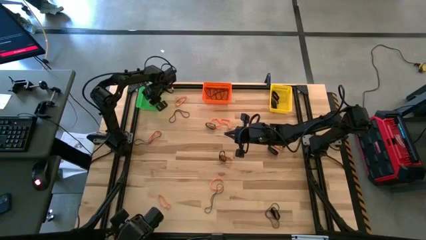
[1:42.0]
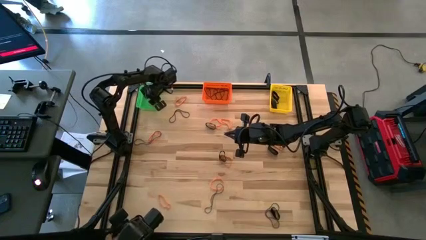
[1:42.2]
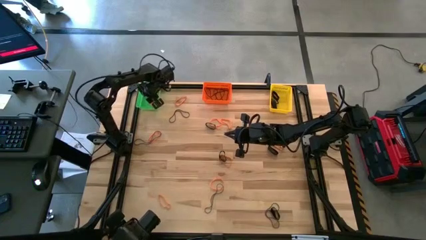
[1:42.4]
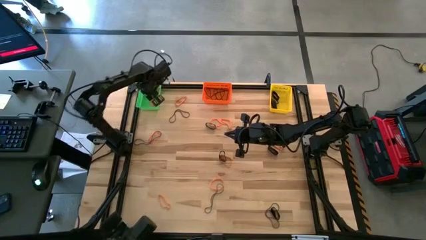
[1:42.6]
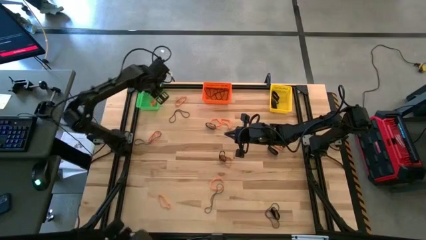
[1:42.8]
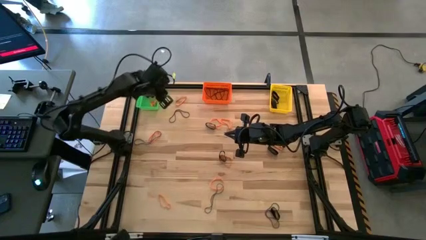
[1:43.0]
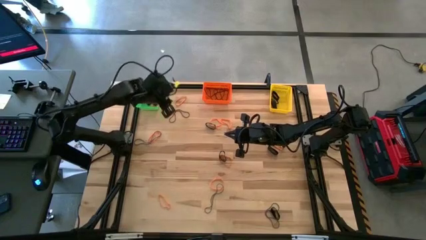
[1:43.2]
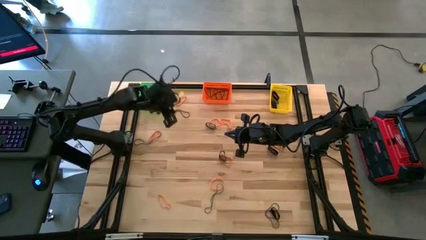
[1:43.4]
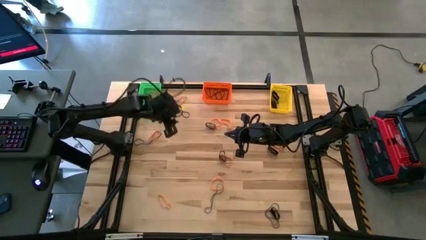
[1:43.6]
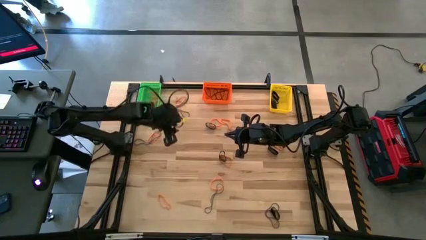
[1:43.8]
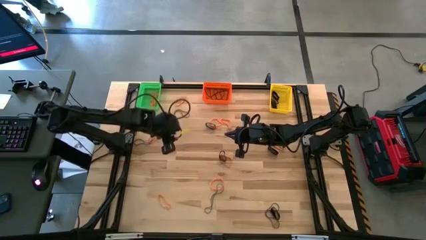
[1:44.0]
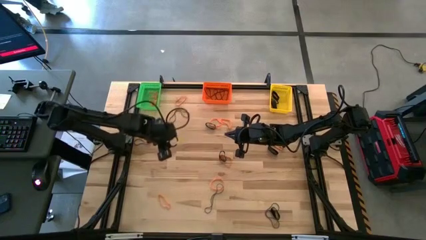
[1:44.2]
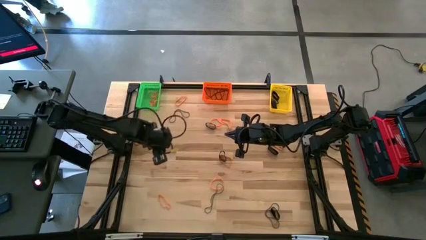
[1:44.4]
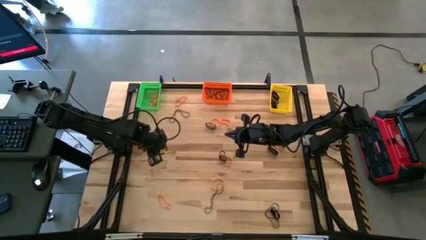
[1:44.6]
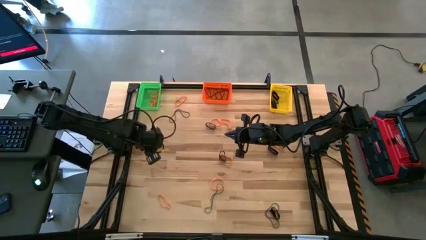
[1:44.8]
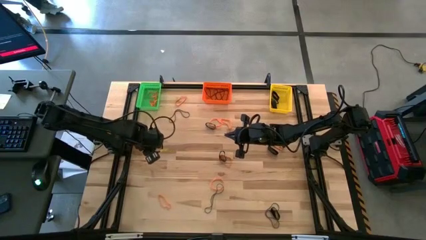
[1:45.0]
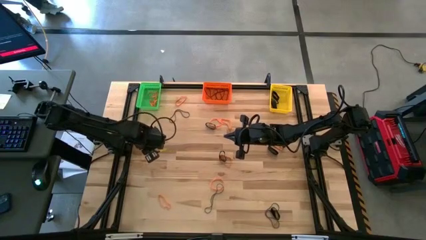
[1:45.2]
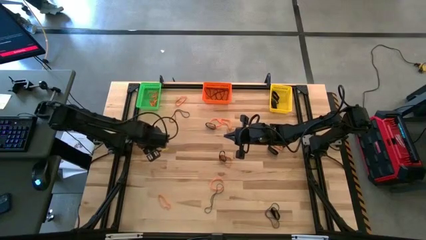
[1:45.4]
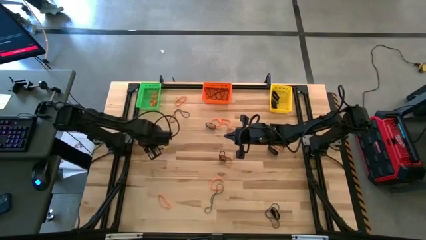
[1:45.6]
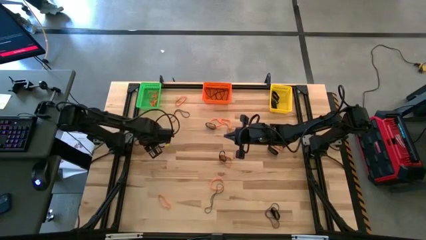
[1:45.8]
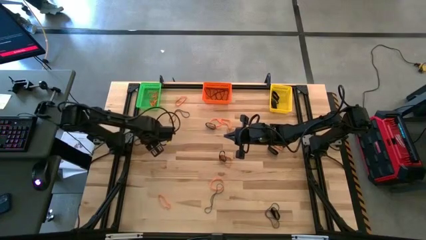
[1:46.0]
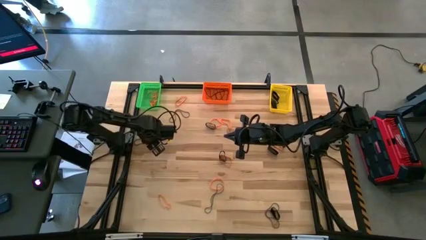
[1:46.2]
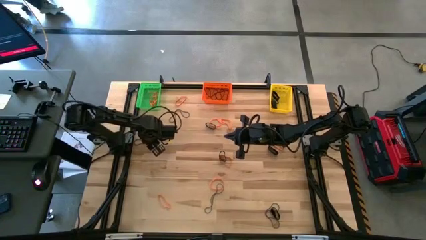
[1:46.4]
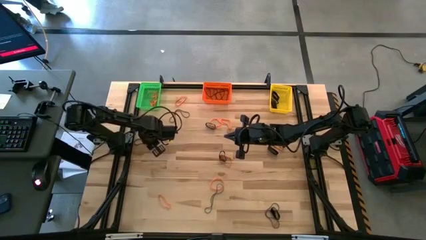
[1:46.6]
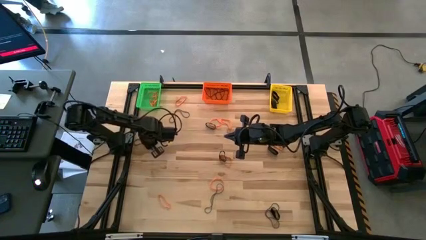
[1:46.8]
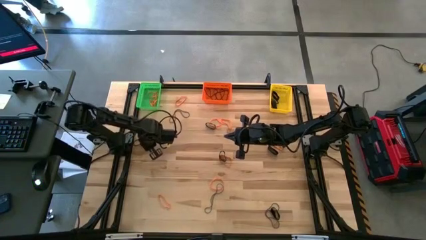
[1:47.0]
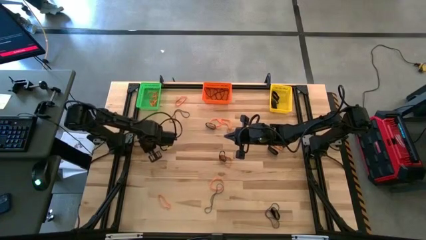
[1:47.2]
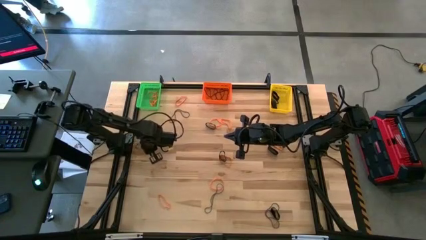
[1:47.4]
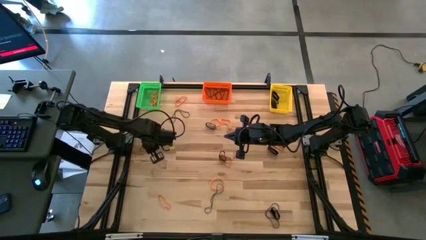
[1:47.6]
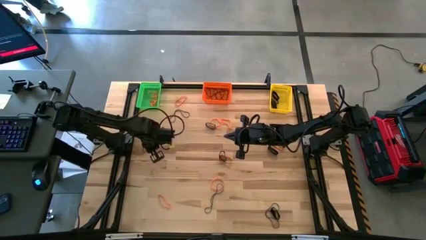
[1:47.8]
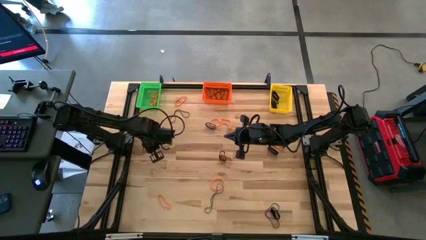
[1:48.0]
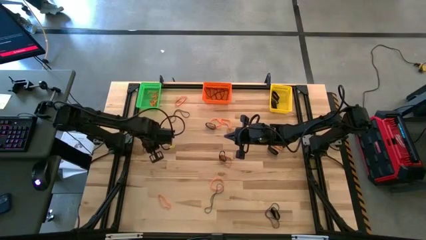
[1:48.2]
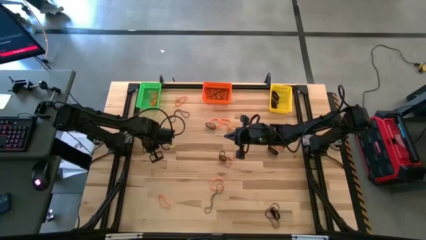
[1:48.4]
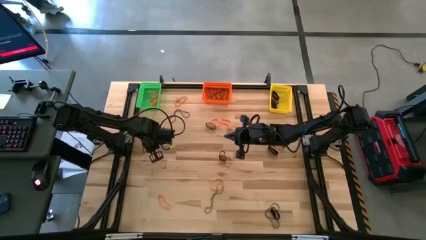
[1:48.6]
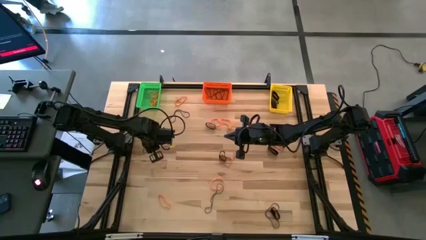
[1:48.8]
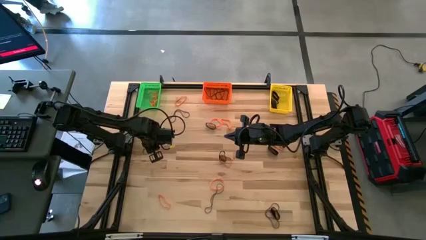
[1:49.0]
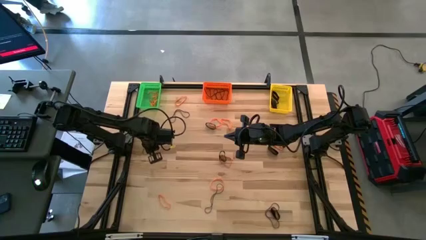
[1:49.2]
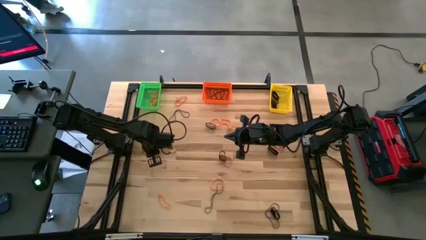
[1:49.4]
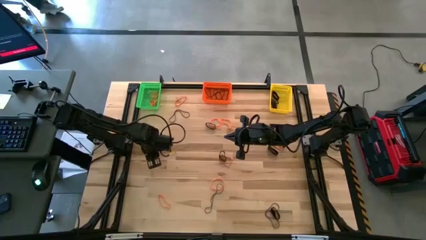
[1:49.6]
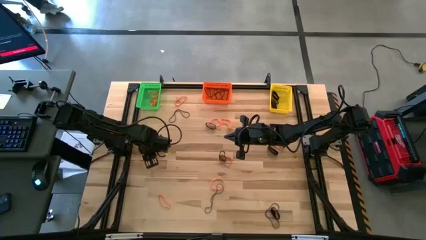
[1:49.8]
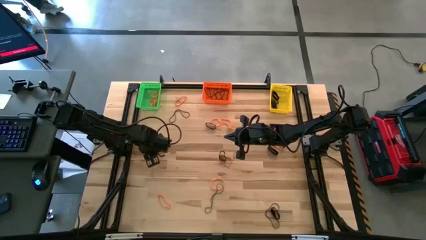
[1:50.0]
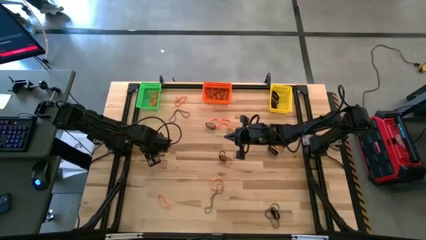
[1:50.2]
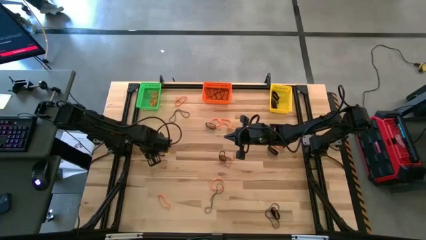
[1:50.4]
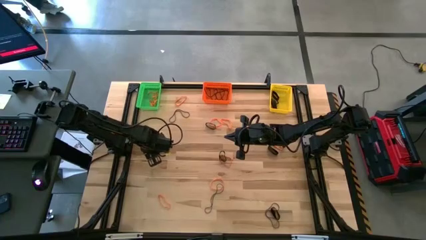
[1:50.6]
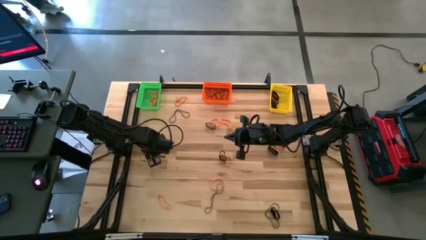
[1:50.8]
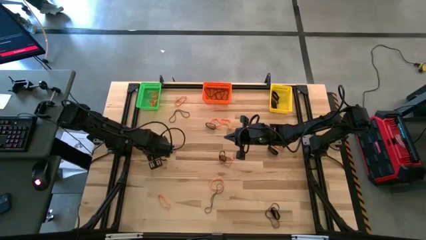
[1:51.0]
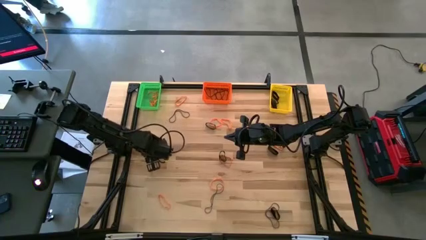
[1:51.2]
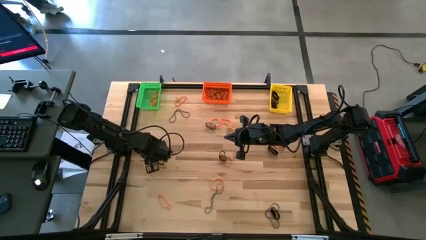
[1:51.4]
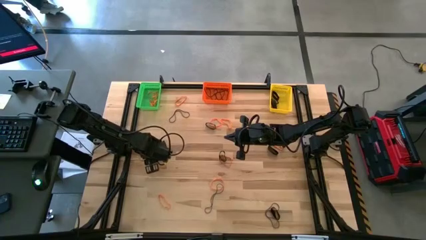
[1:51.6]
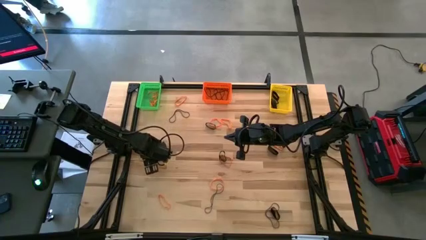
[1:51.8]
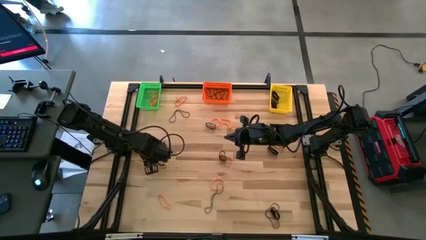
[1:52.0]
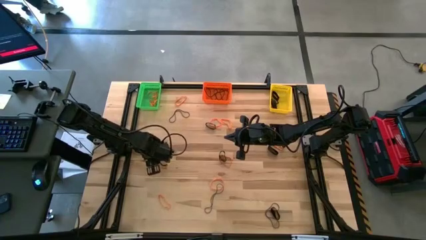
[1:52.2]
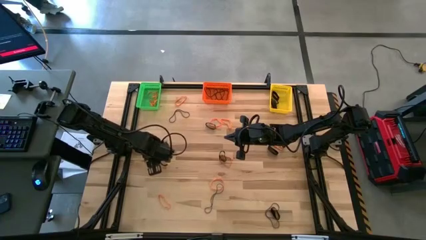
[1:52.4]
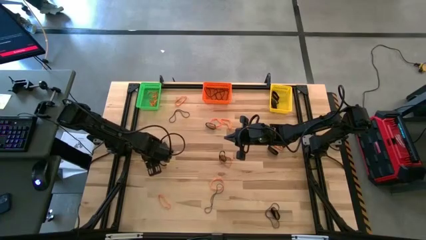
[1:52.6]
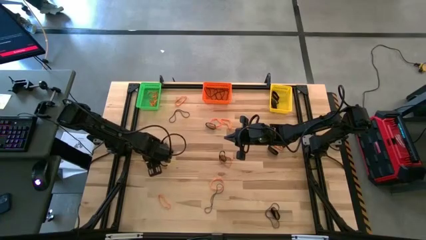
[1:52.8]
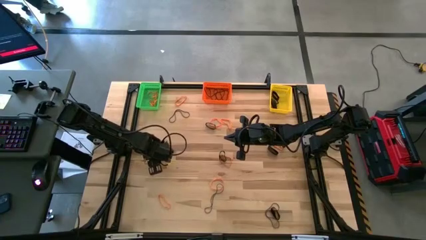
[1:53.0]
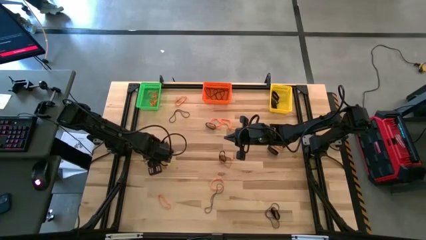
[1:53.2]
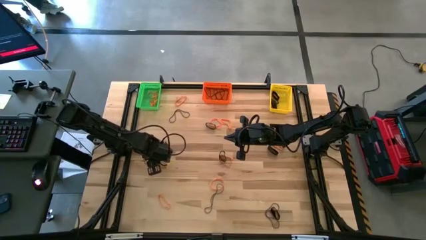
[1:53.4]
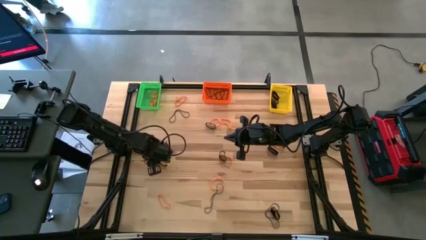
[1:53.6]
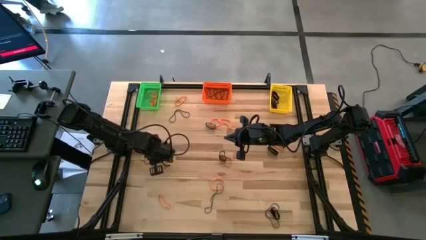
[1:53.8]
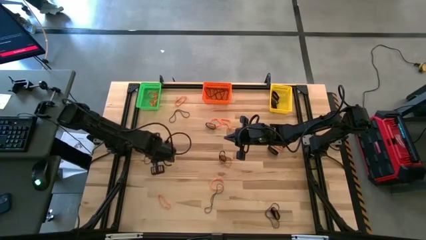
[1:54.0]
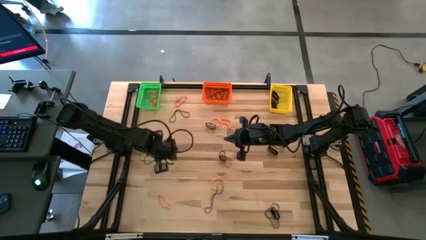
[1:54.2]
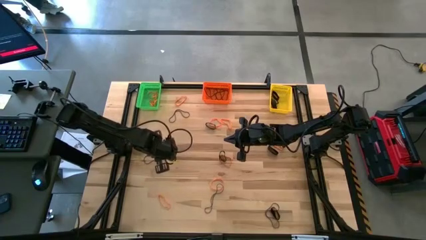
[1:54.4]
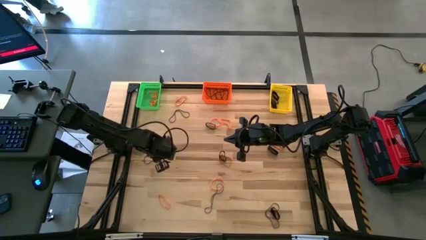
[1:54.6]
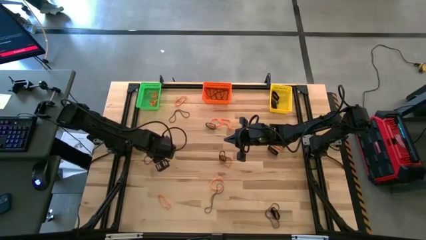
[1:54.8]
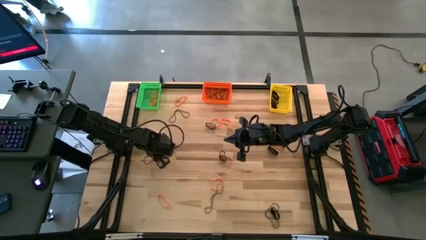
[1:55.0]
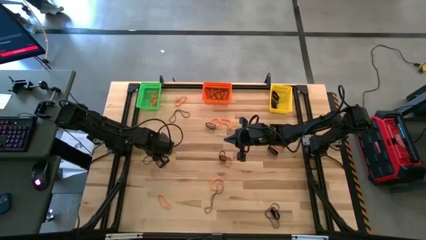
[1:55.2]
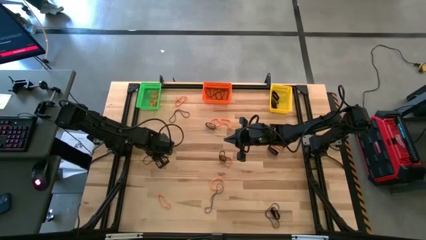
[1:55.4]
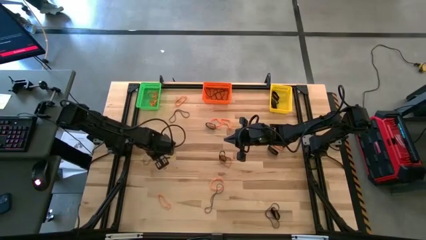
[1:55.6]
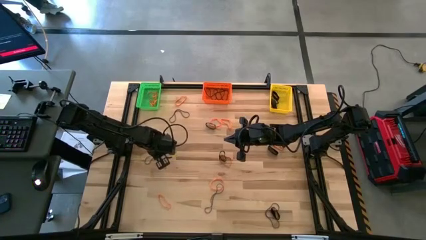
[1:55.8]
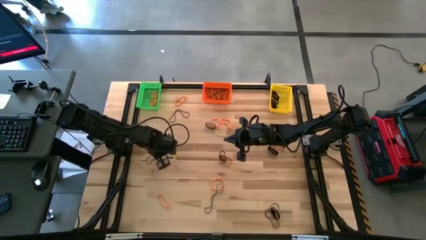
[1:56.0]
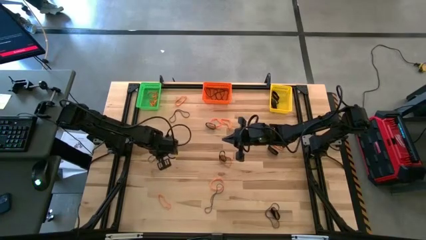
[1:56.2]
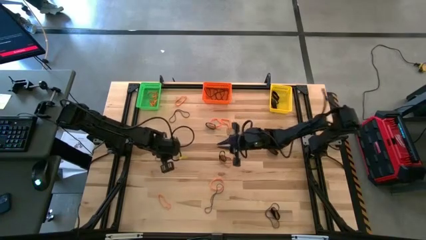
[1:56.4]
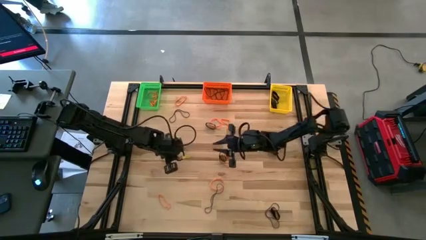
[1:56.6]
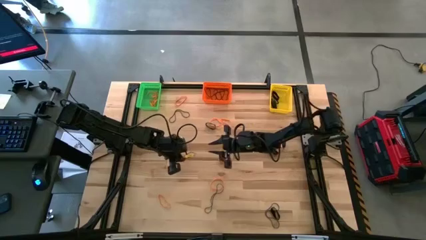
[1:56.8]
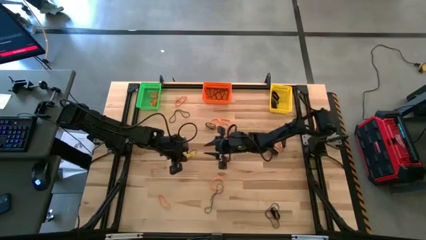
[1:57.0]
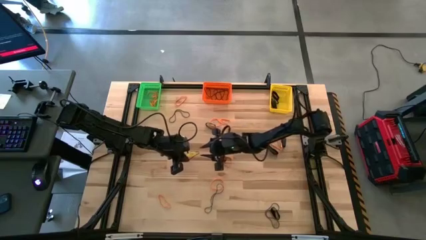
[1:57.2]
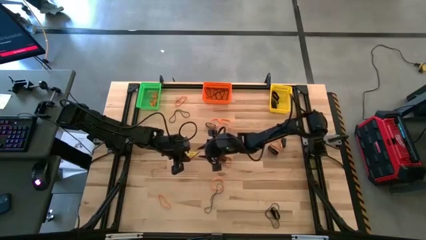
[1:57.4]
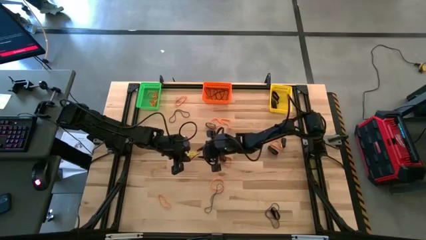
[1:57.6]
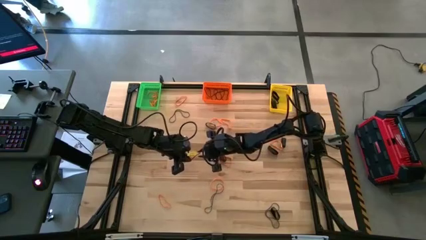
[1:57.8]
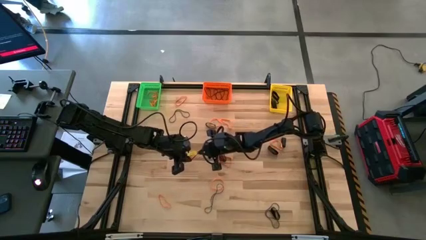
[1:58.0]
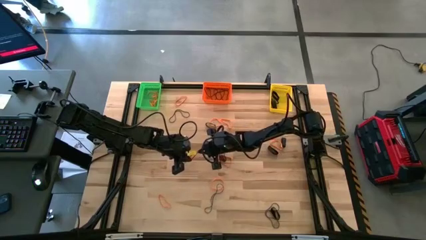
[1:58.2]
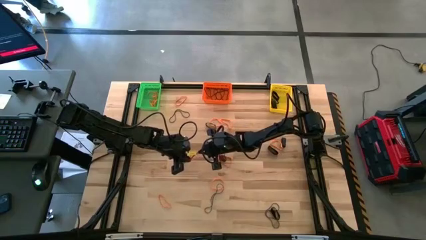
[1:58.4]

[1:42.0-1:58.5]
Task: Sort rubber bands into baskets
Put the middle left blue rubber band into the orange bin
